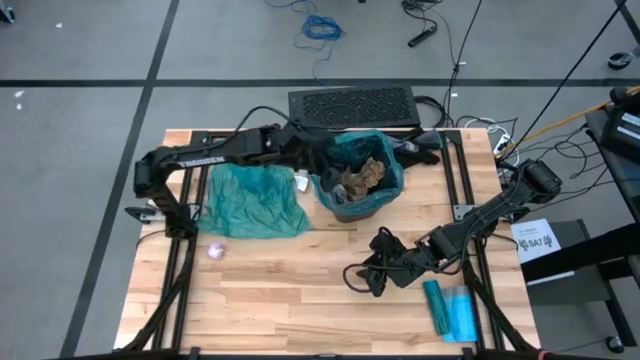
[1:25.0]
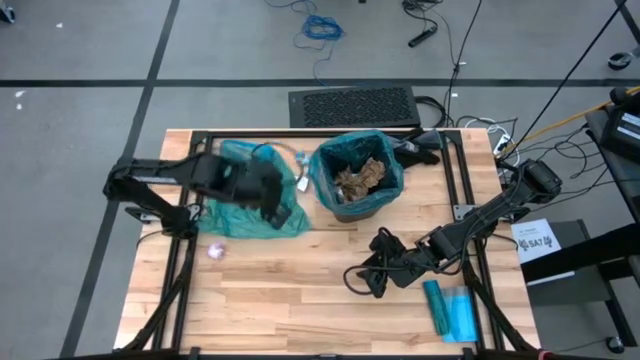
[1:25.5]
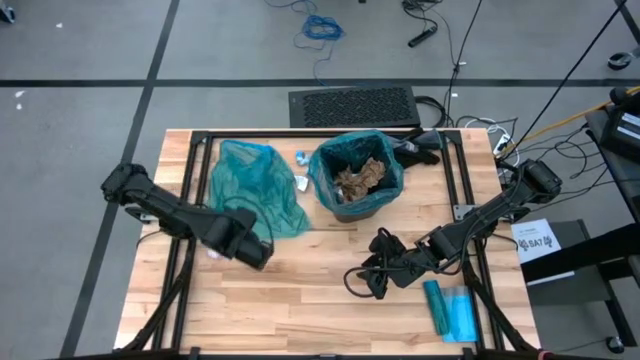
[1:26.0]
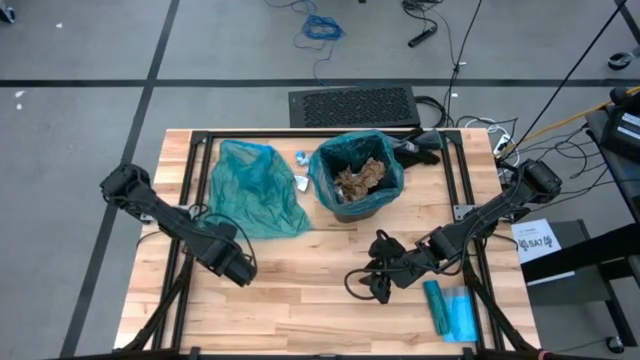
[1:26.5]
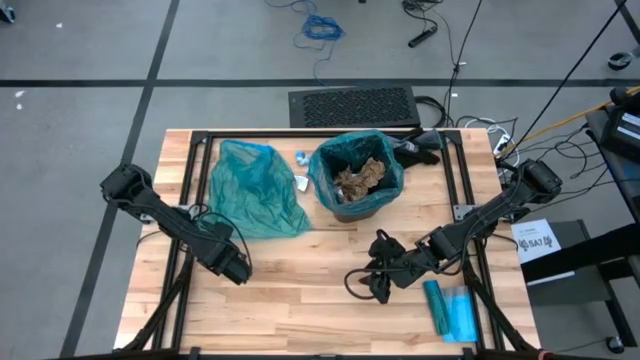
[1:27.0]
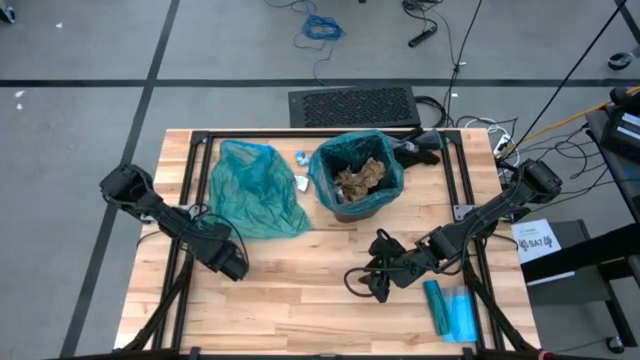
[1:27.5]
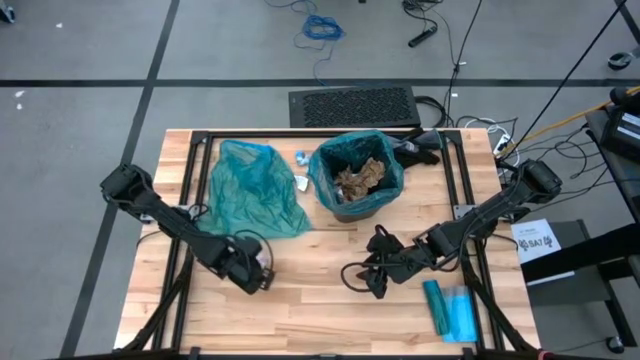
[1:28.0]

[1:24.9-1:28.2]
Task: place trash/remove bag and relplace
Put the pink trash bag into the trash bin

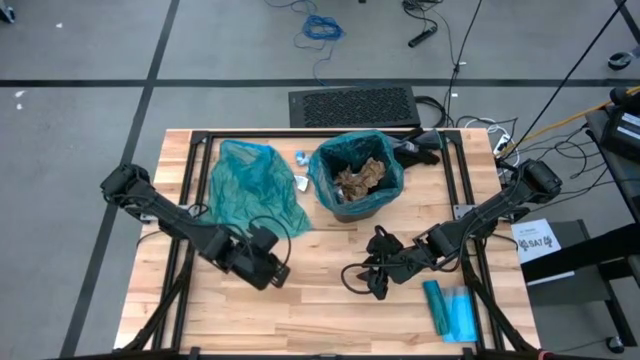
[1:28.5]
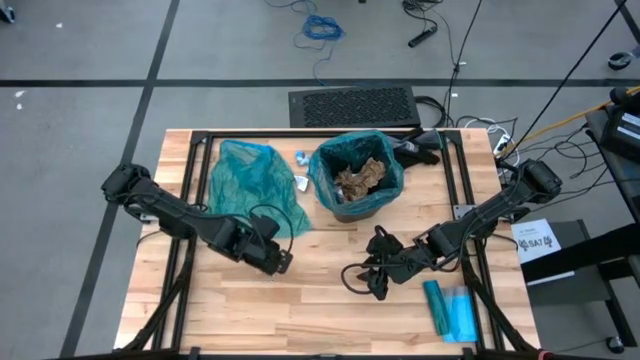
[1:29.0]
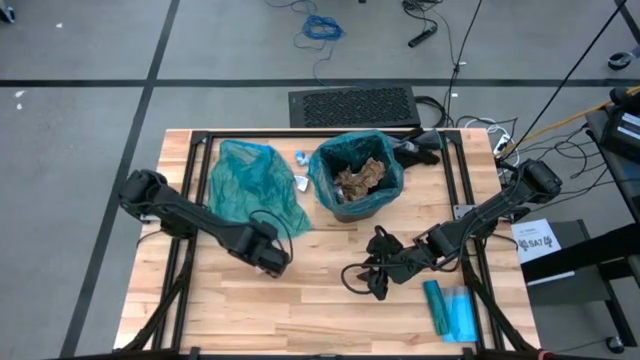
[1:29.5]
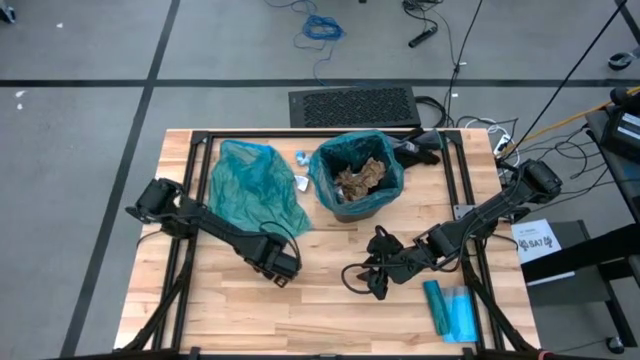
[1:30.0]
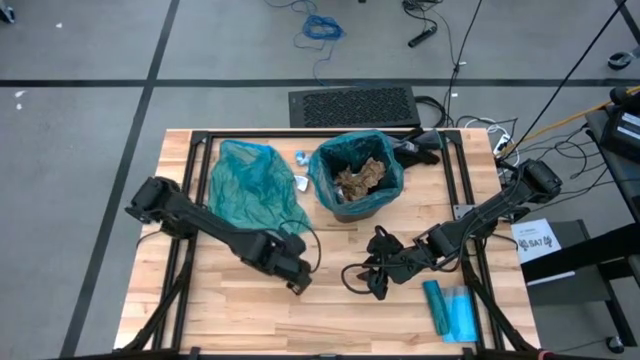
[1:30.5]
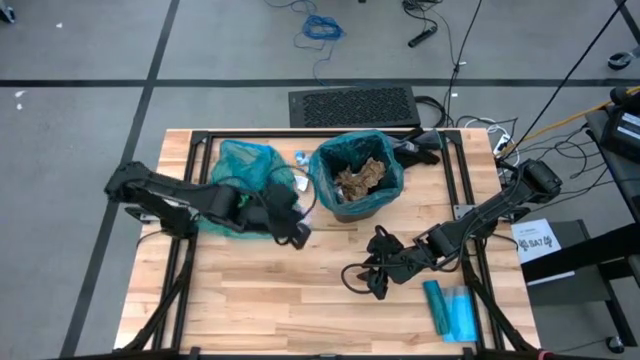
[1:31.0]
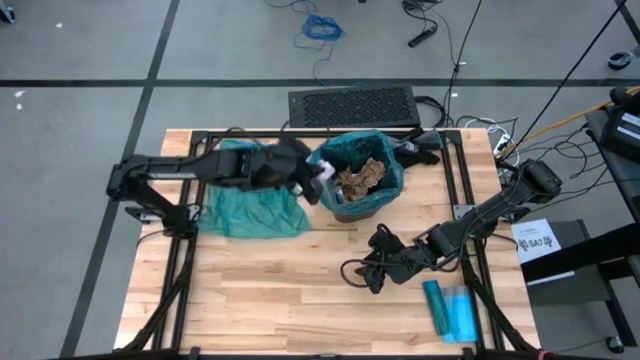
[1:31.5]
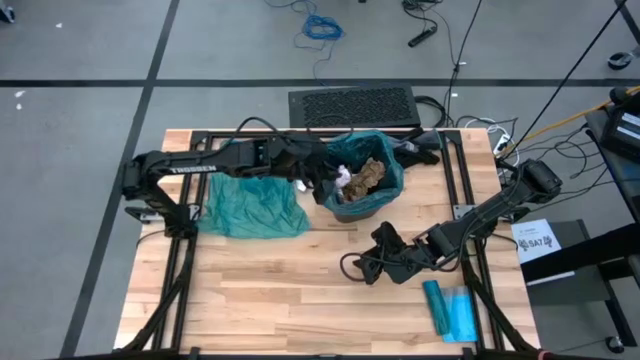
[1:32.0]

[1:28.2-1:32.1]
Put the pink trash bag into the trash bin

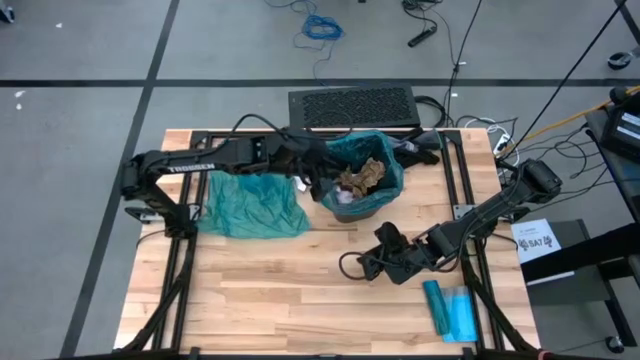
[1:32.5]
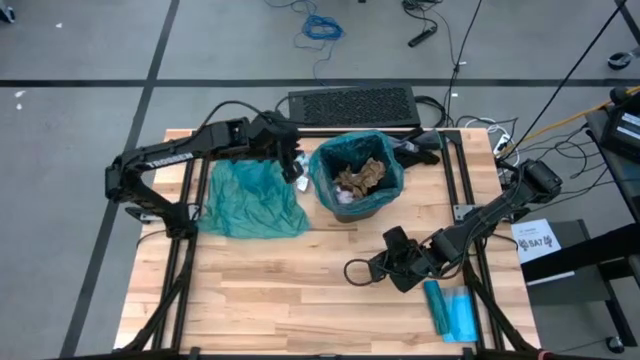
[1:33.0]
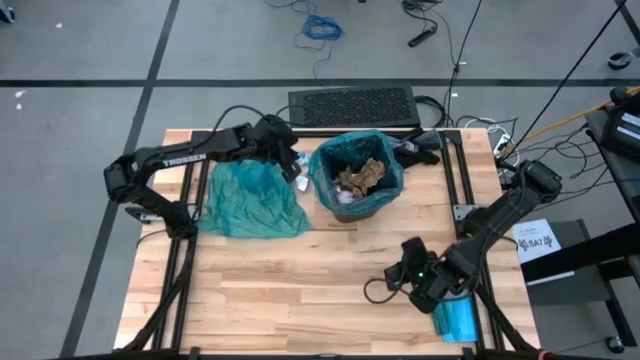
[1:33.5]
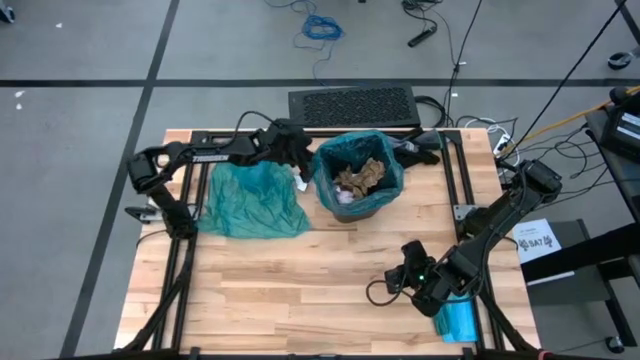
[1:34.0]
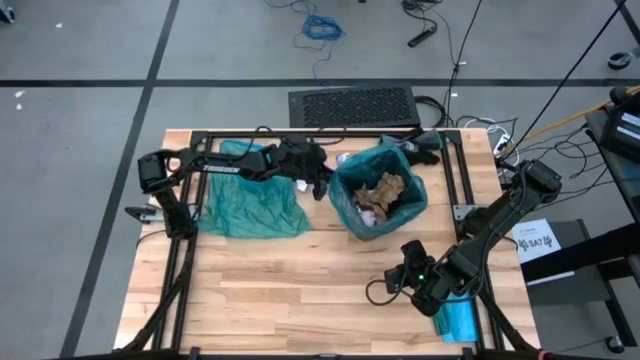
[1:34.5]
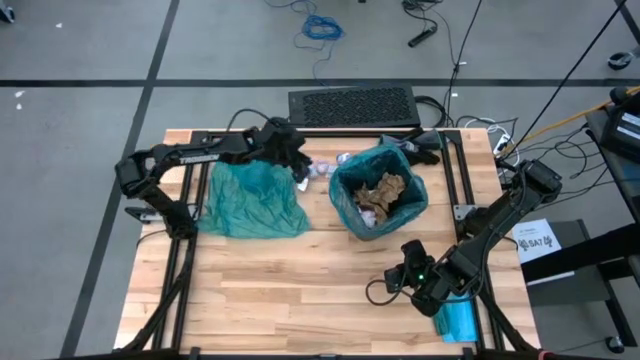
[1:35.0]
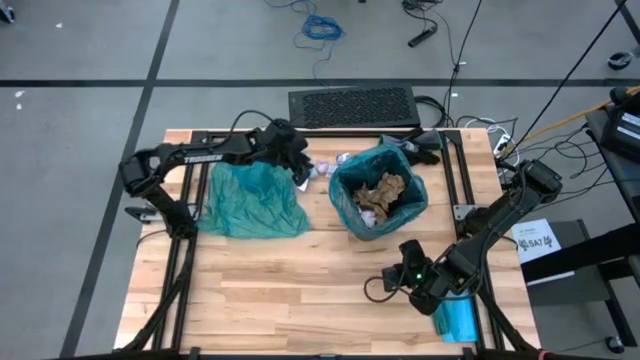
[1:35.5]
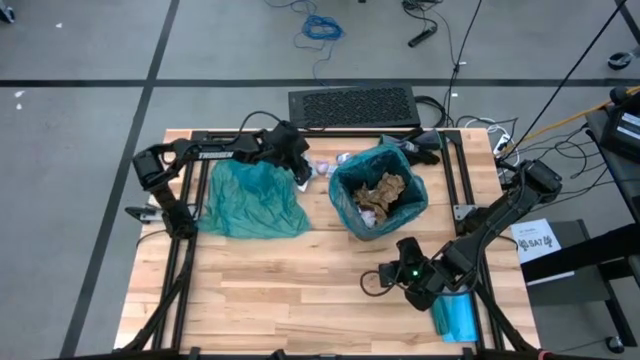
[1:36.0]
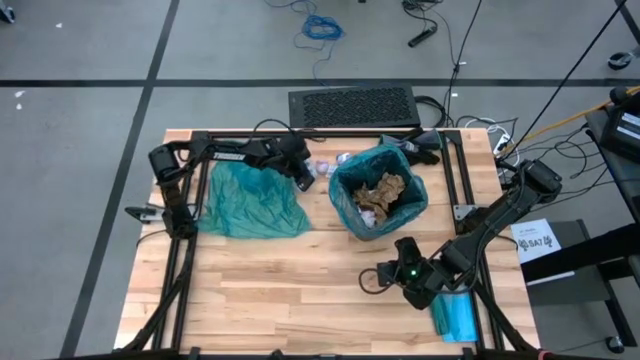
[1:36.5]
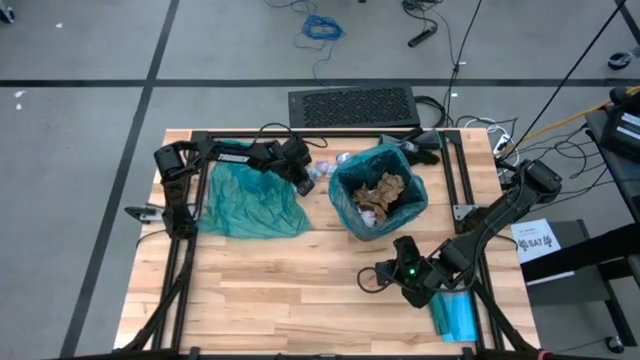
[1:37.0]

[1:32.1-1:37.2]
Put the blue trash bag into the trash bin

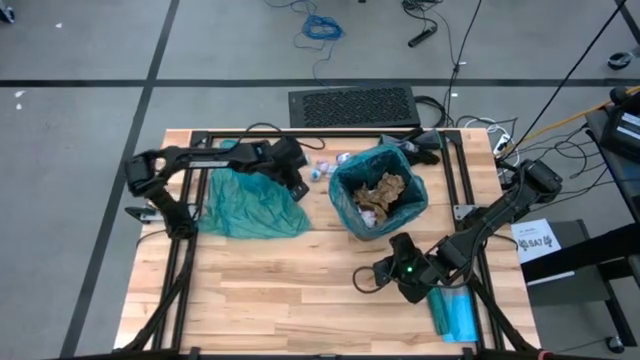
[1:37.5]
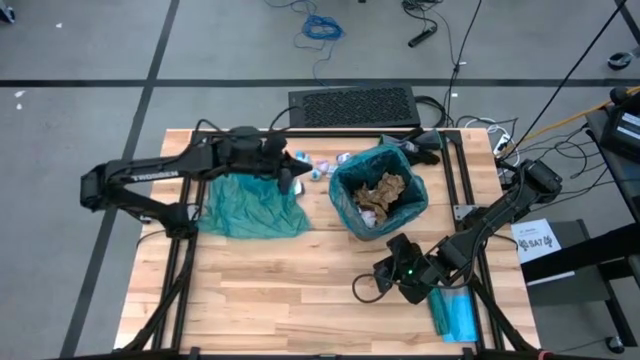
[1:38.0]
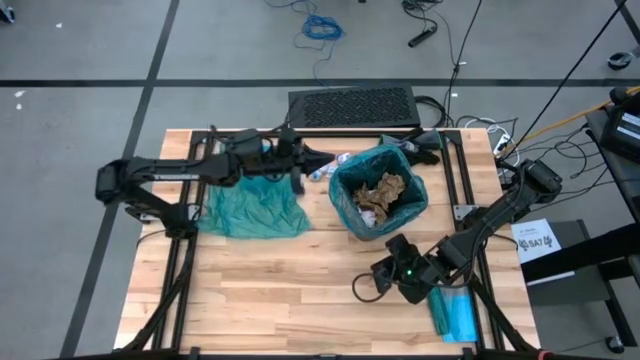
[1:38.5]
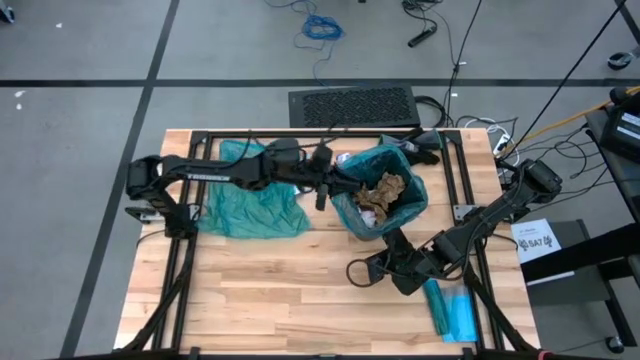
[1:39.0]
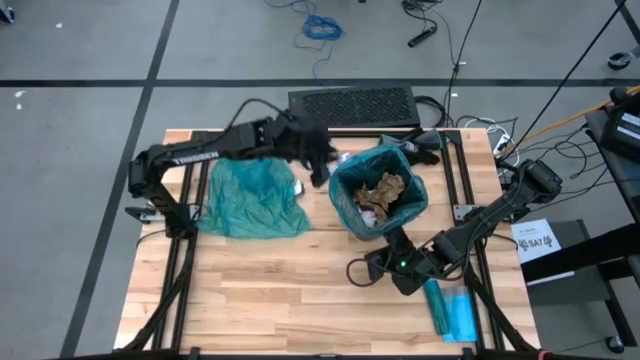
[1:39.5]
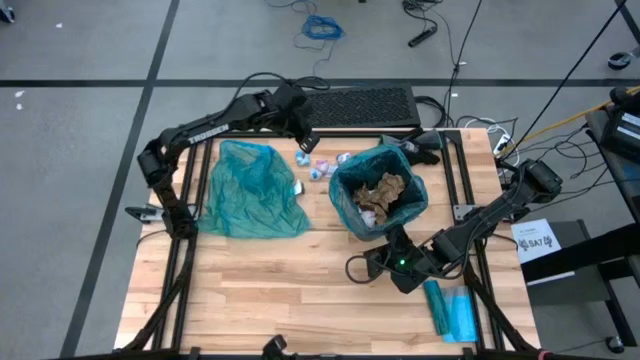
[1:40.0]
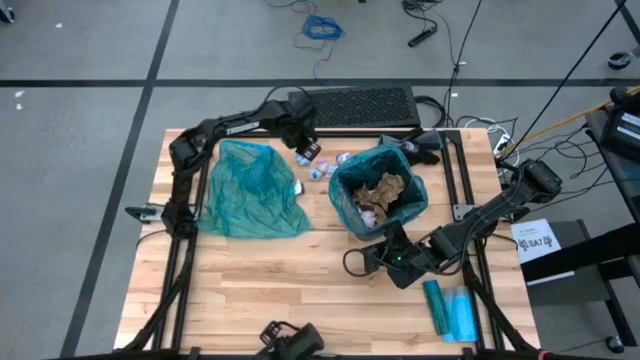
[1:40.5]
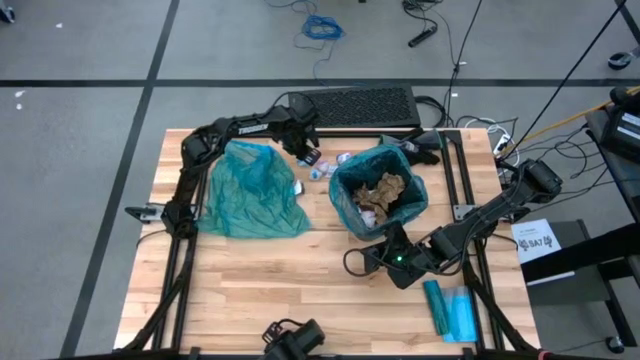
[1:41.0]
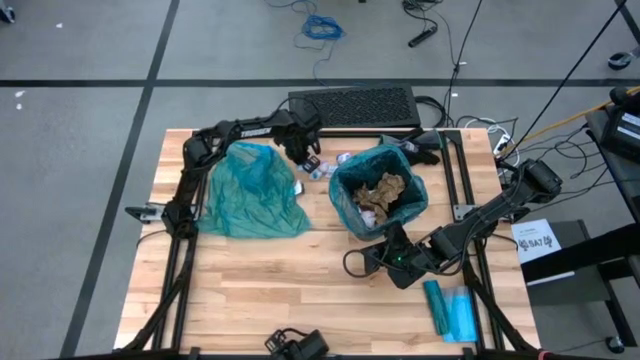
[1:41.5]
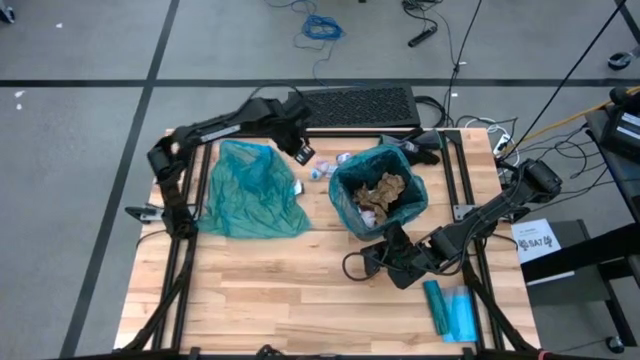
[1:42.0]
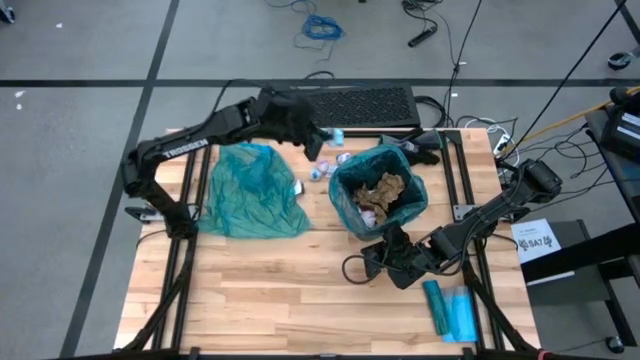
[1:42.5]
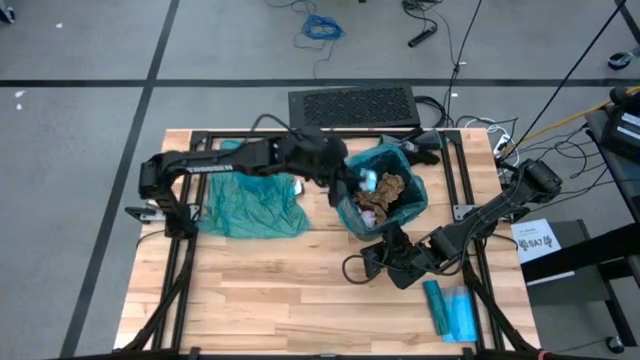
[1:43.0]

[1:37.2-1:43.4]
Put the blue trash bag into the trash bin

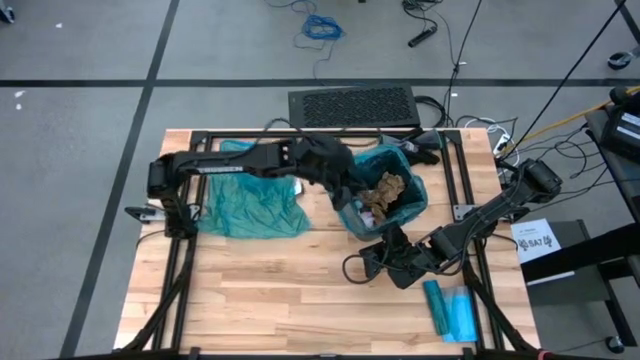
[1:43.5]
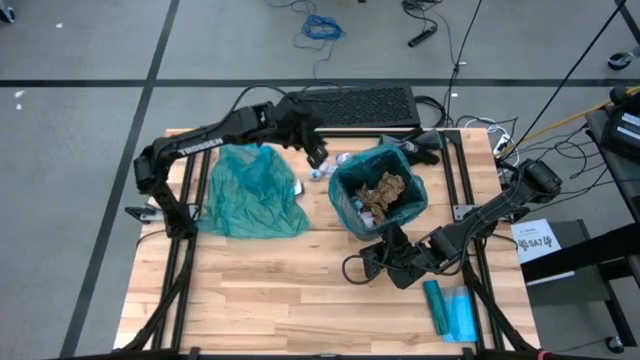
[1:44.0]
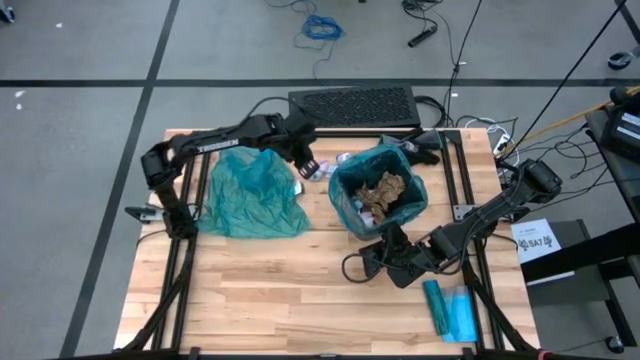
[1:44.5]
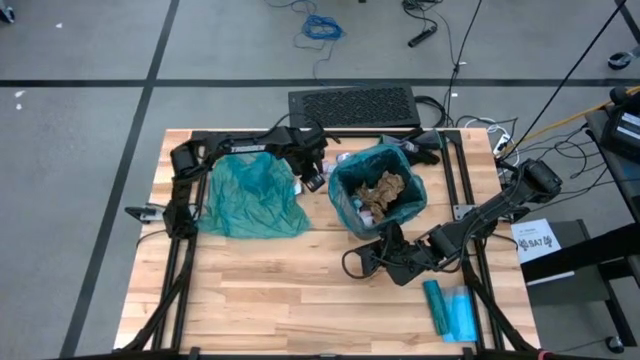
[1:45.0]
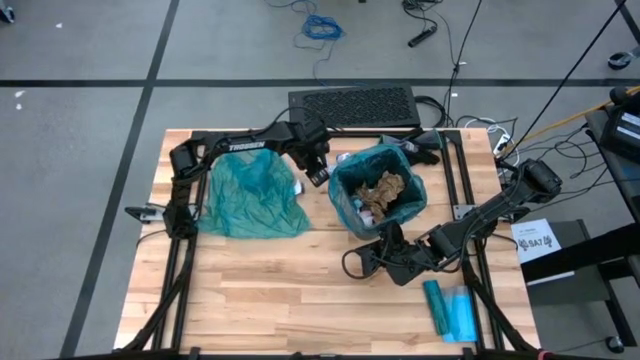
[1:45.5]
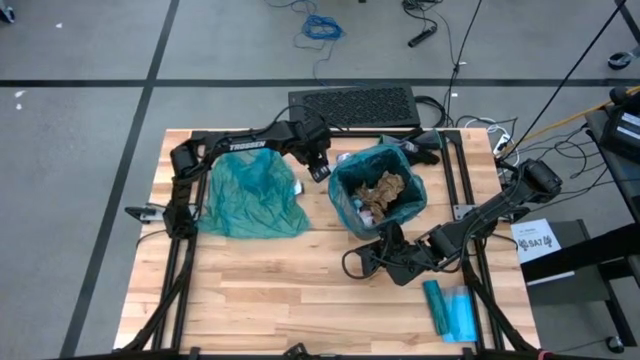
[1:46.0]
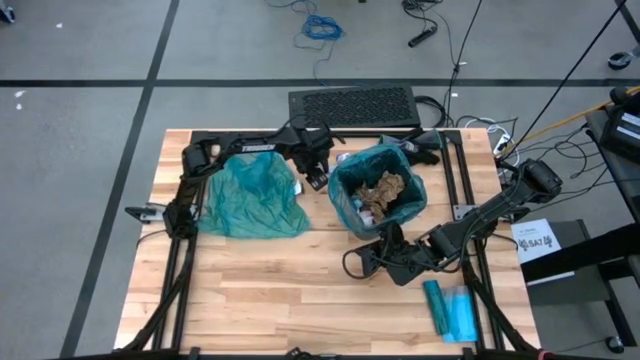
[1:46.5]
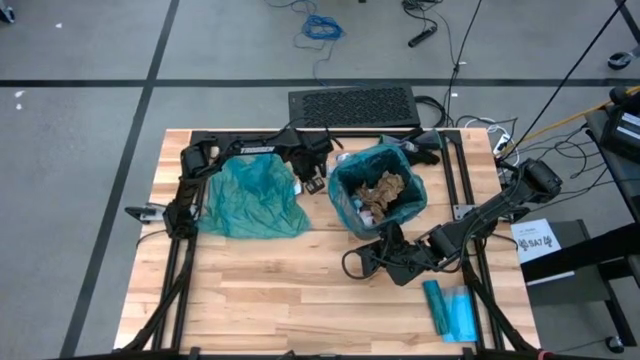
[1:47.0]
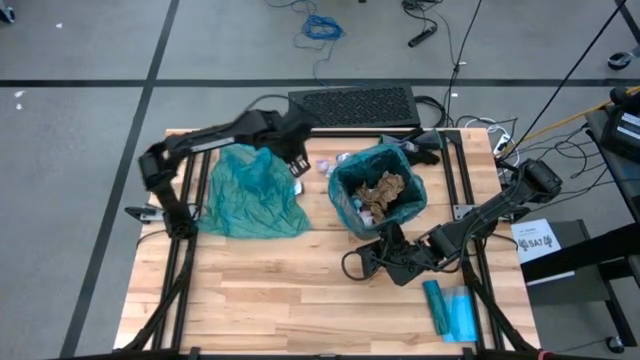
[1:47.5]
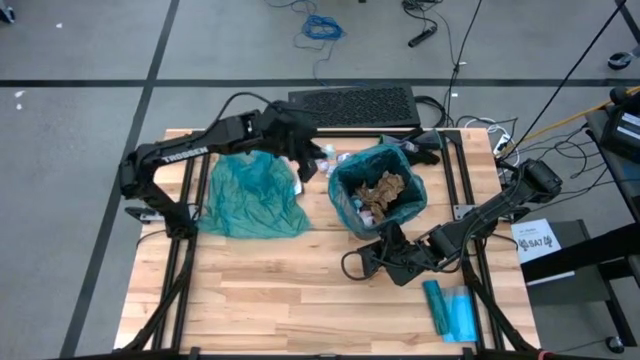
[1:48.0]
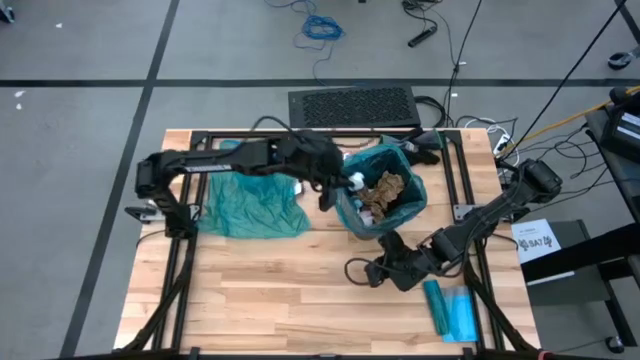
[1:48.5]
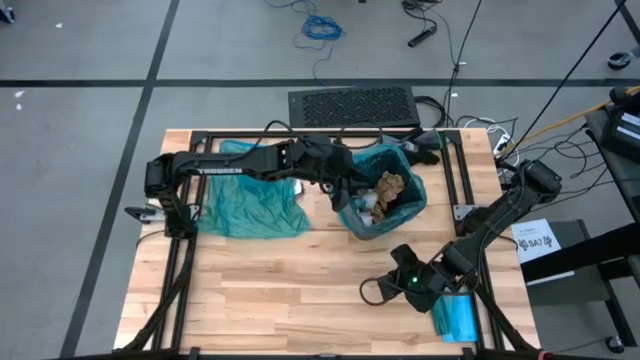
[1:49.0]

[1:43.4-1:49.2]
Put the blue trash bag into the trash bin
